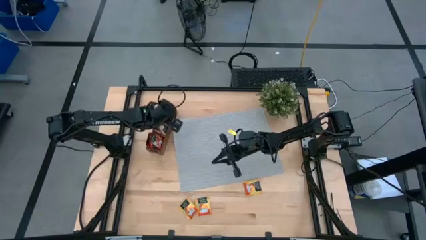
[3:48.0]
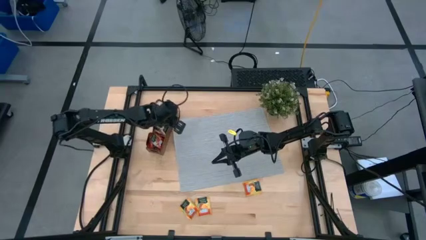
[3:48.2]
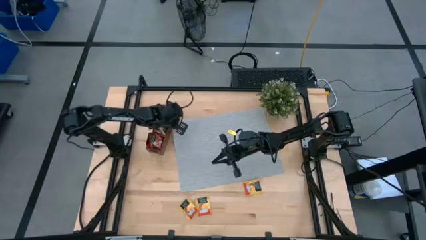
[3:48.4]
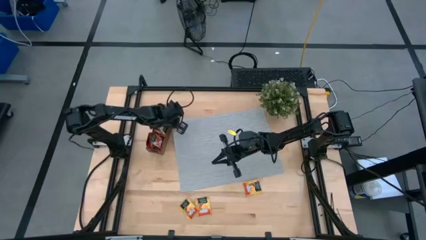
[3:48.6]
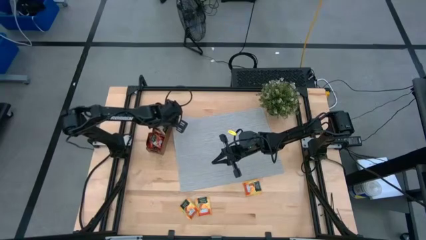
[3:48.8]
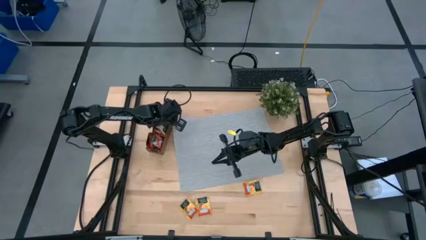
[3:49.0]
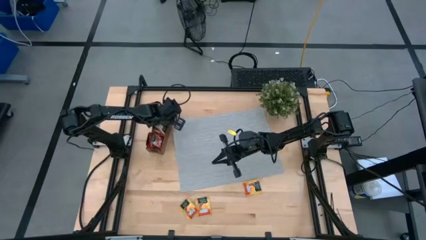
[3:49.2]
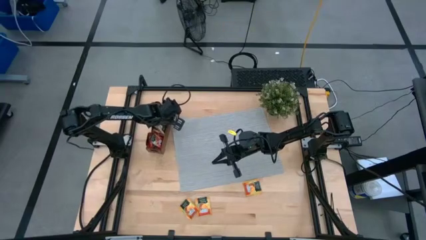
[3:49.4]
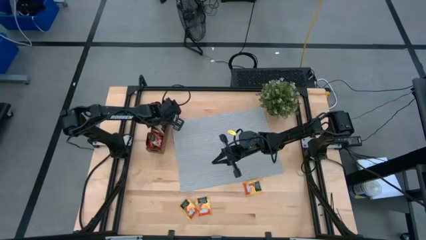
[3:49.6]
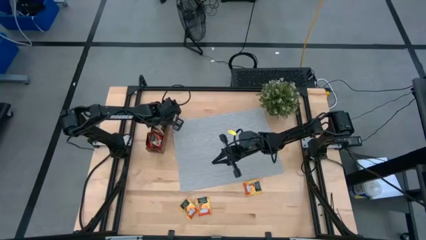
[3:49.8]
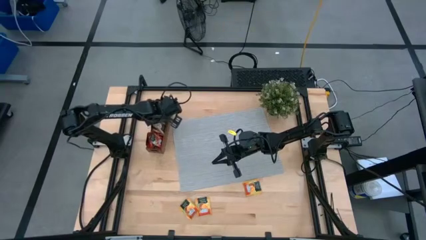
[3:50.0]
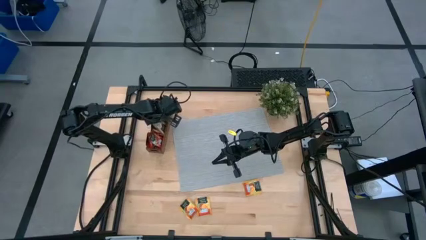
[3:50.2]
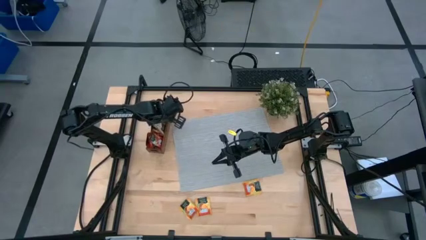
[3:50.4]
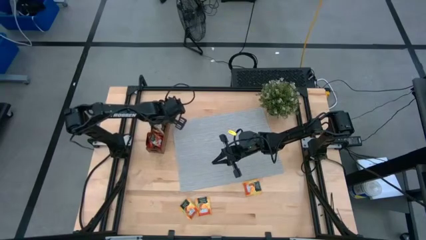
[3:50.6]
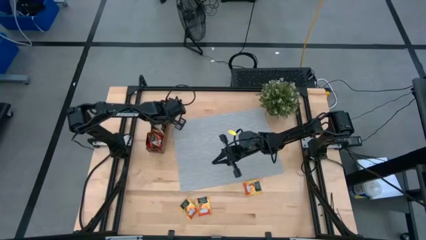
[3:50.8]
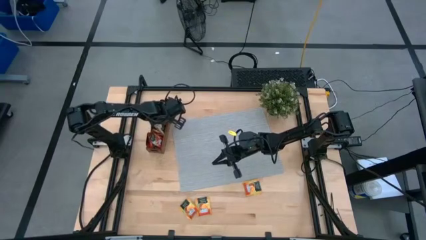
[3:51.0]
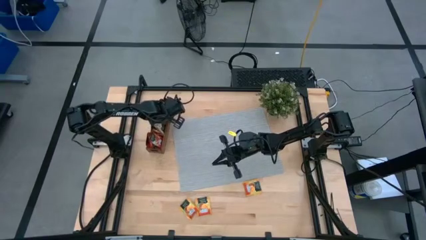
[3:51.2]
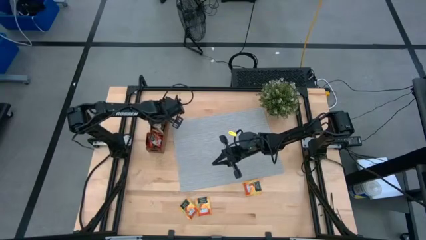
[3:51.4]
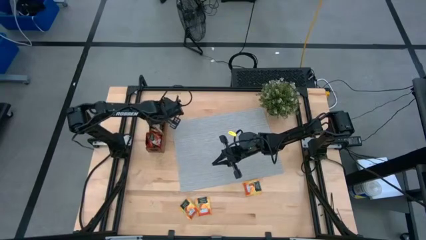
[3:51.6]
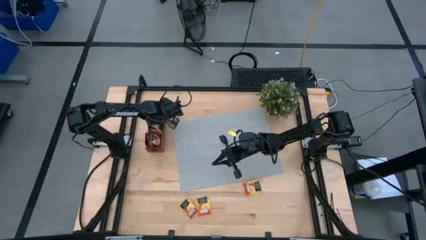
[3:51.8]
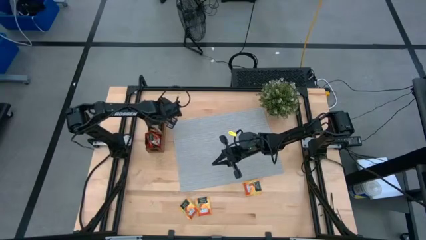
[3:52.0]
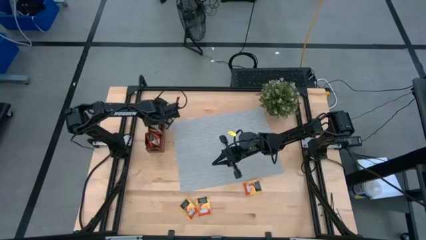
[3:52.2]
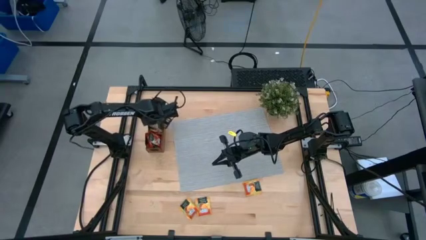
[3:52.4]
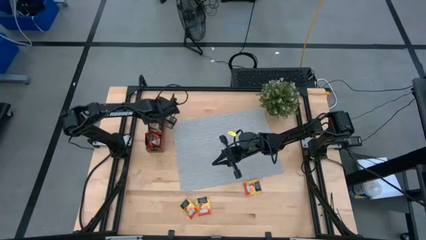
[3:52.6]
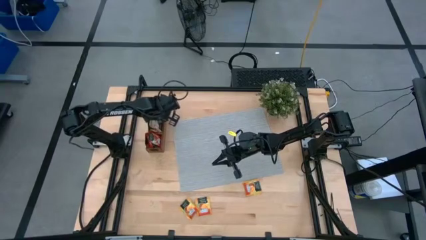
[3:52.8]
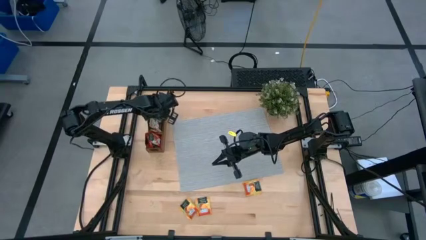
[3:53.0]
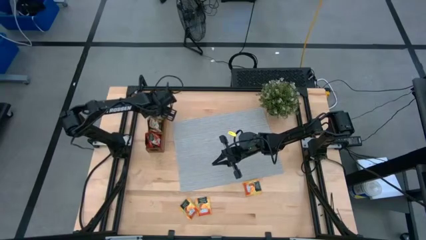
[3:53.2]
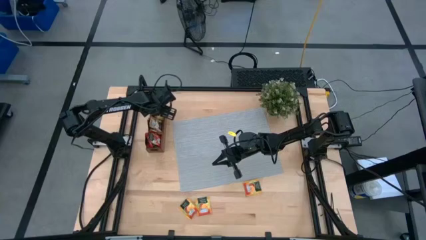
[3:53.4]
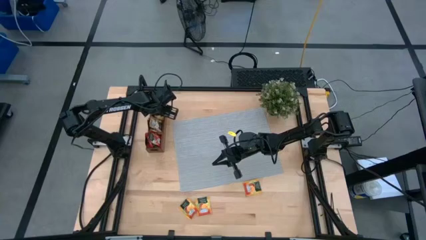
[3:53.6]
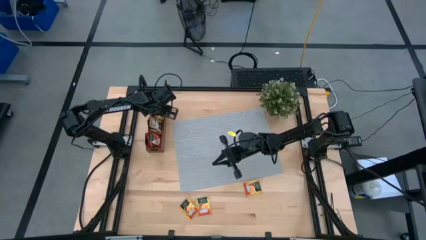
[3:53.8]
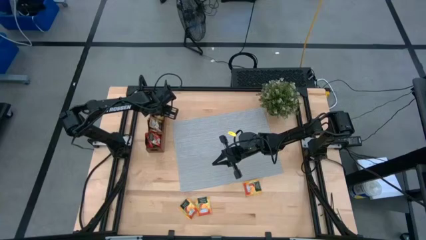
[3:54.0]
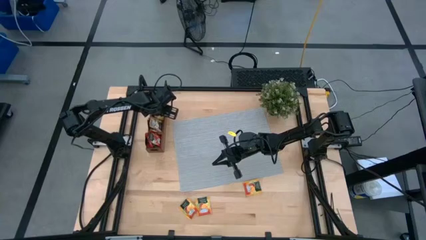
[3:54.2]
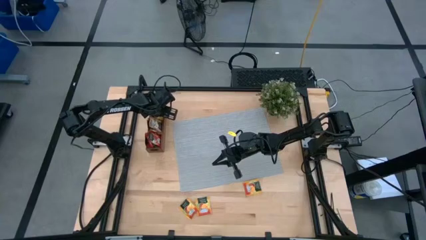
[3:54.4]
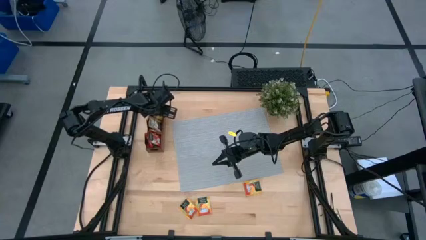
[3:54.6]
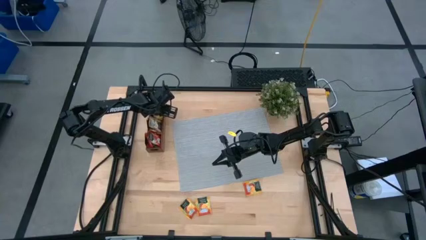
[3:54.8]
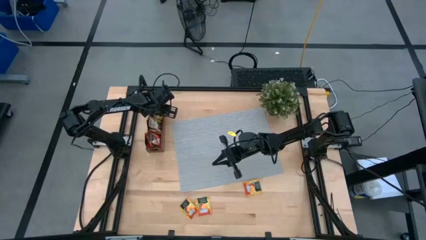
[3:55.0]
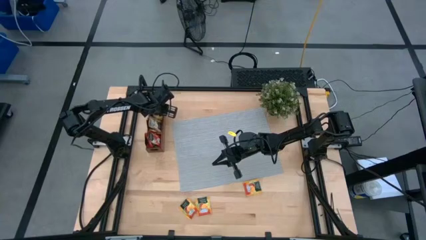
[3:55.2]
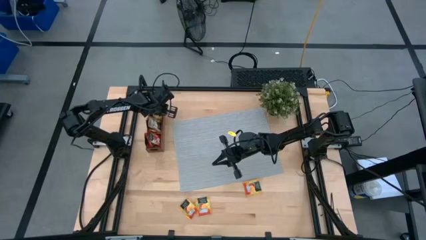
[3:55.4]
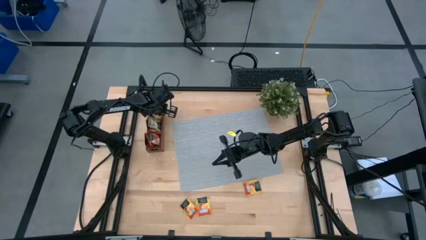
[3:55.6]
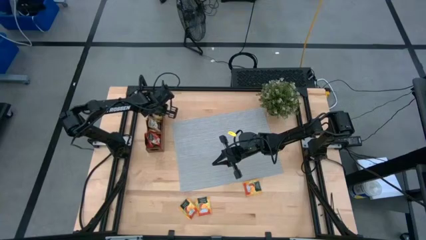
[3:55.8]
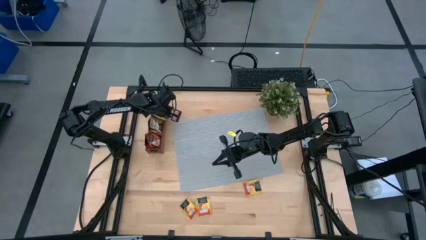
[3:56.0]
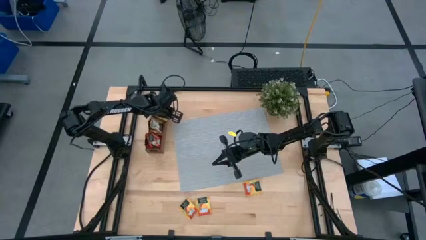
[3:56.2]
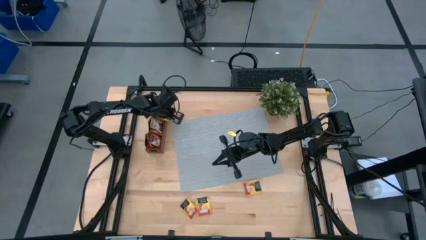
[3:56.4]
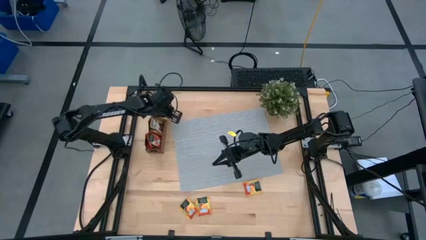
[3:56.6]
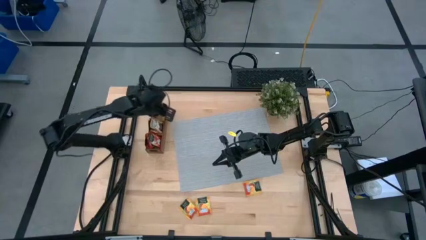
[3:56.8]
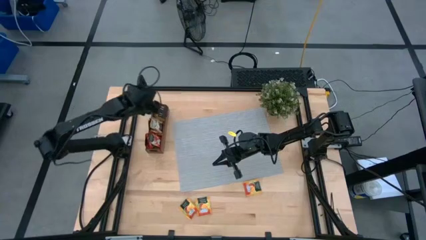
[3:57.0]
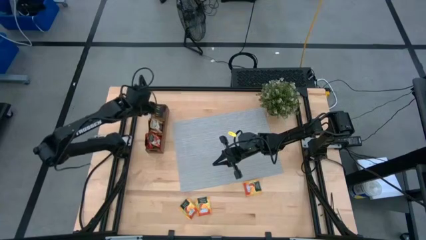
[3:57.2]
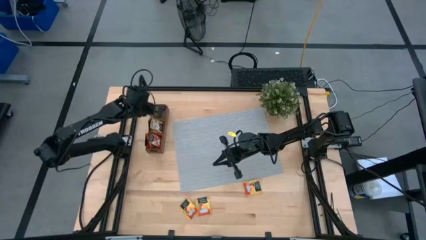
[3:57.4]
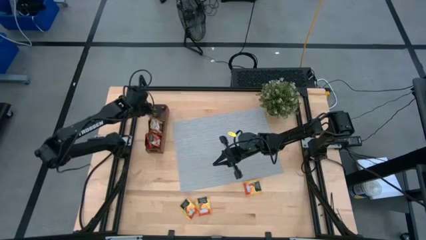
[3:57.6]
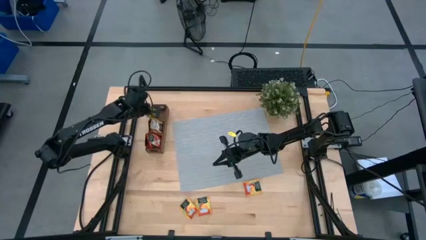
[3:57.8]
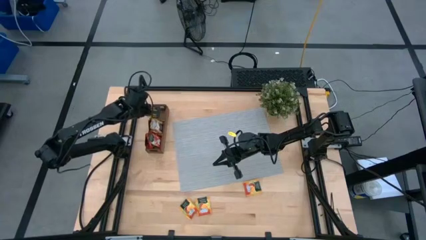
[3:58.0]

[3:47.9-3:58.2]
Task: Pick & Place Tea
Put the yellow tea bag into the right section of the wooden organizer

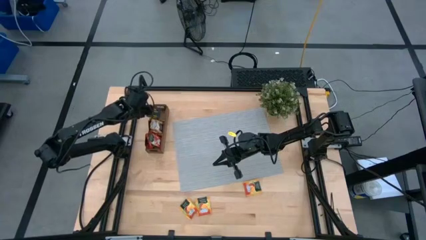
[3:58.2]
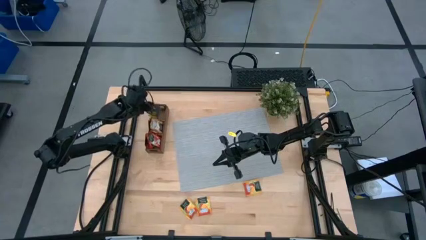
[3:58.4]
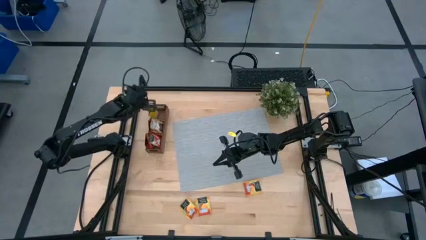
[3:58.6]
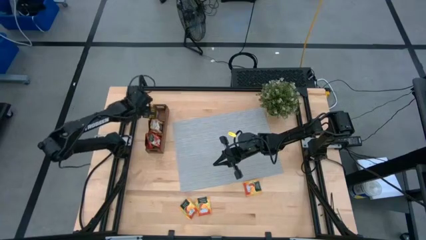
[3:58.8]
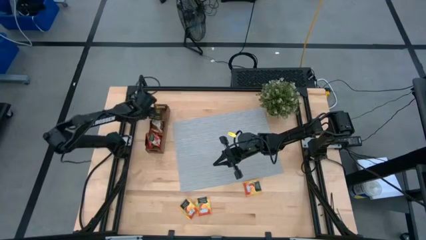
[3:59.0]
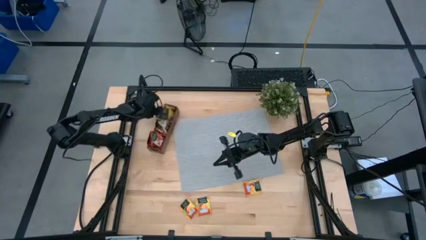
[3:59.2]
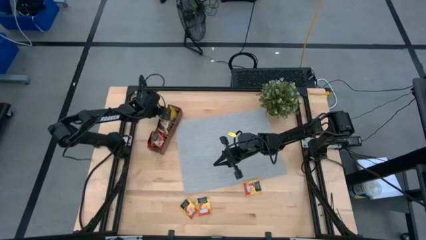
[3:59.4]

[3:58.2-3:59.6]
Adjust the wooden organizer on the table

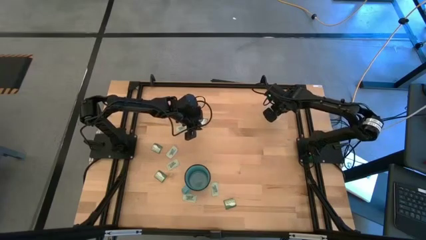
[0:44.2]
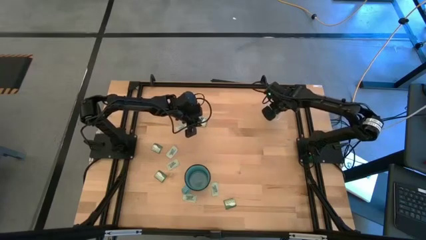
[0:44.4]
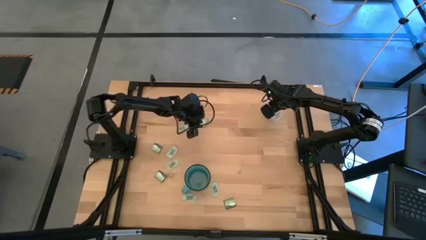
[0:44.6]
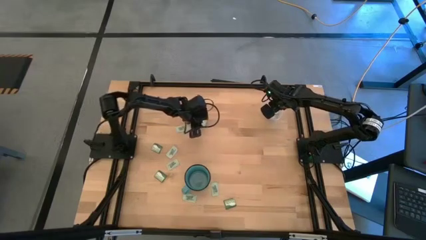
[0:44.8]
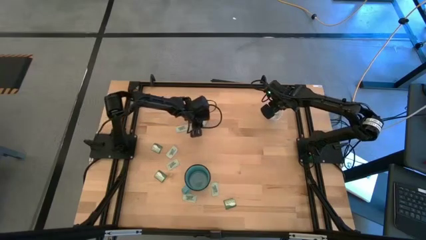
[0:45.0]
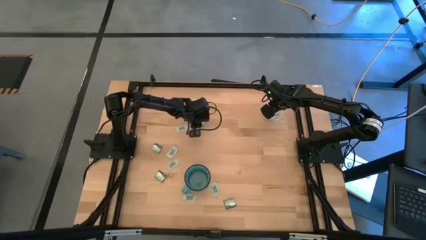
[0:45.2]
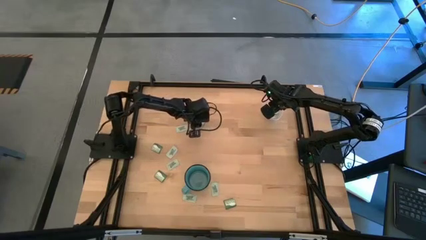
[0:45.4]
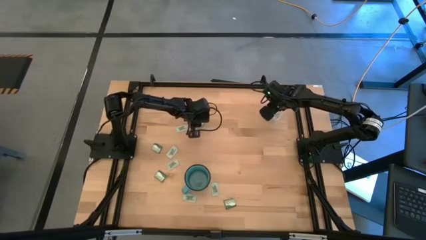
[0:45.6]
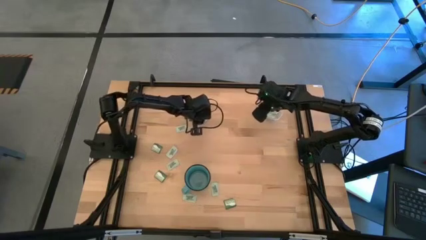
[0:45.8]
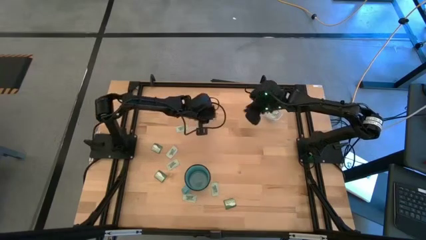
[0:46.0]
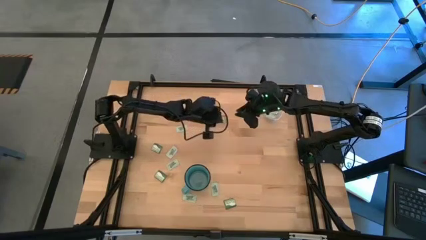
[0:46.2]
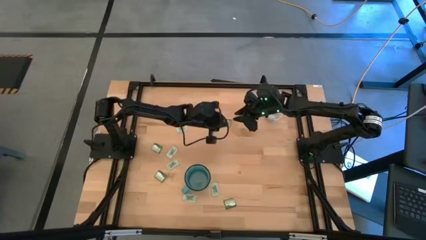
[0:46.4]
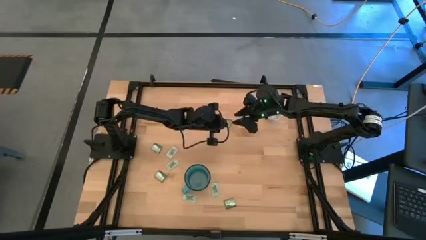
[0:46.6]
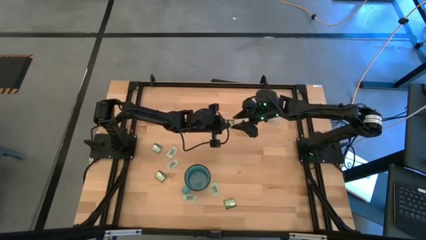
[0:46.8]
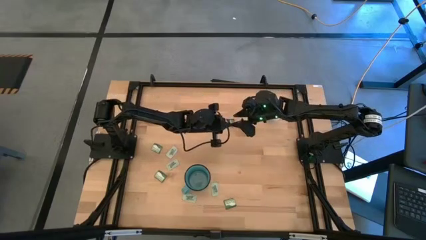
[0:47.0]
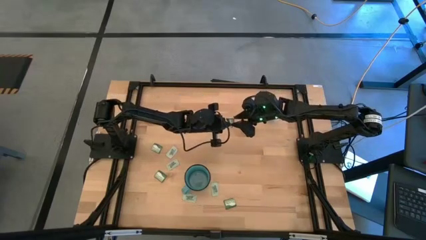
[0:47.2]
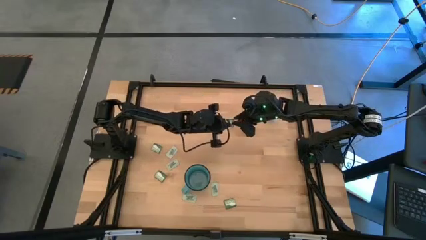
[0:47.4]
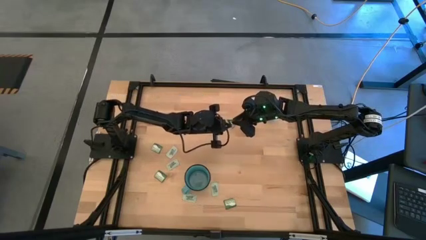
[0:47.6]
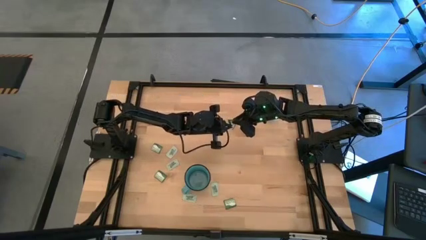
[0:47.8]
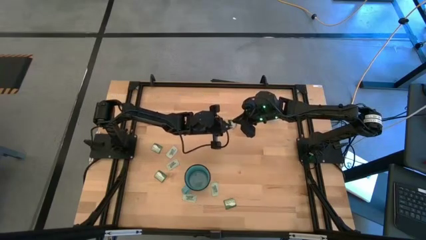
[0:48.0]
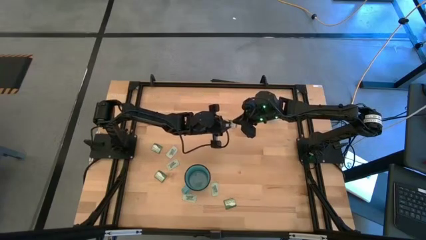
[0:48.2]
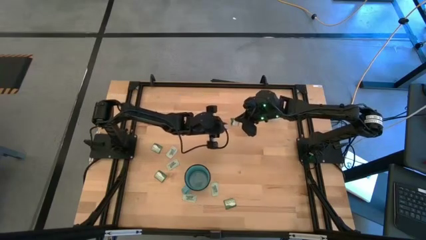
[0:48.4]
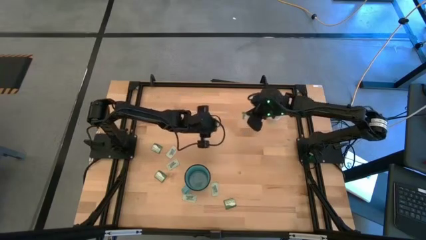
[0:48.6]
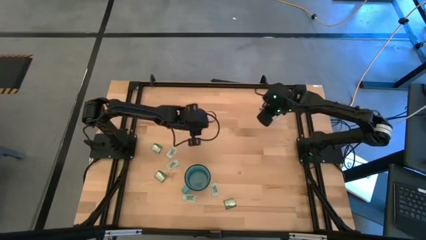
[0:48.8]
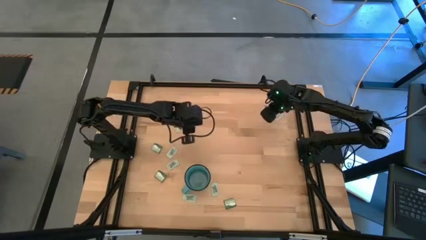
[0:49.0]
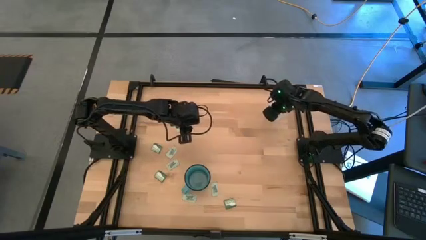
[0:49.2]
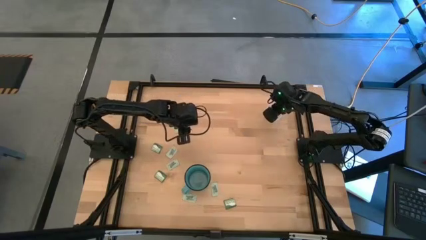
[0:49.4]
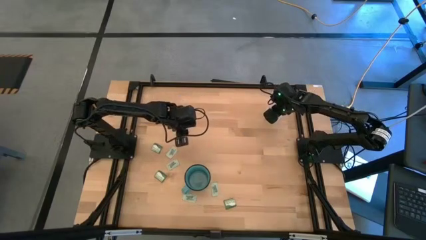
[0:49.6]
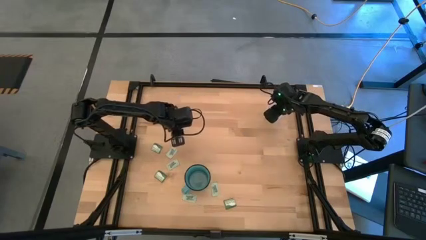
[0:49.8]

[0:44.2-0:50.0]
Task: Pick and place items into bin
Put the truvia packet into the transparent bin
